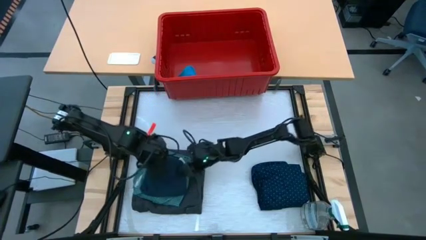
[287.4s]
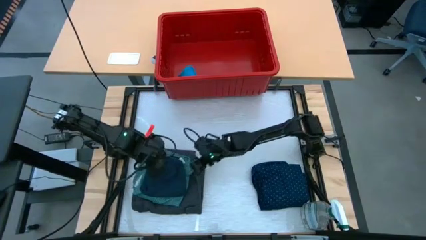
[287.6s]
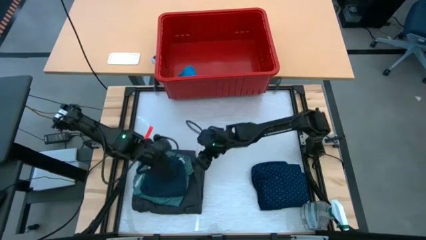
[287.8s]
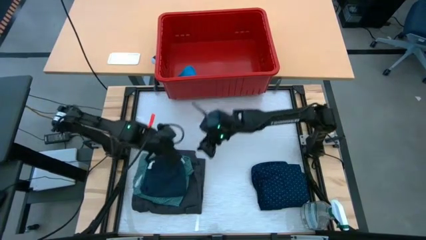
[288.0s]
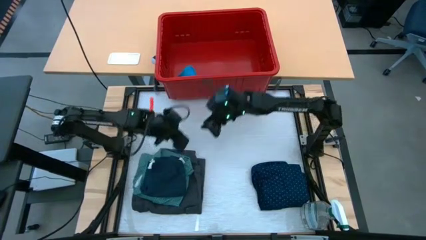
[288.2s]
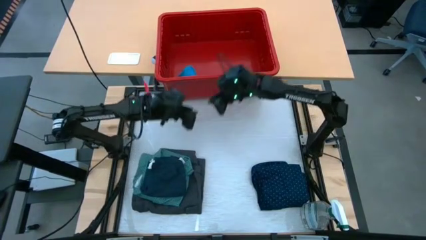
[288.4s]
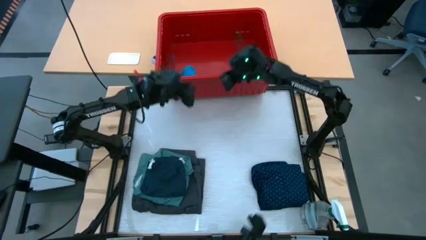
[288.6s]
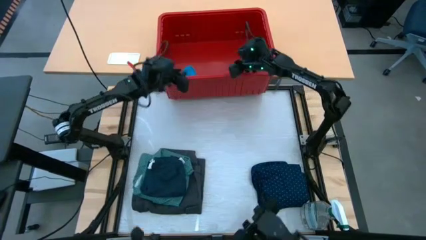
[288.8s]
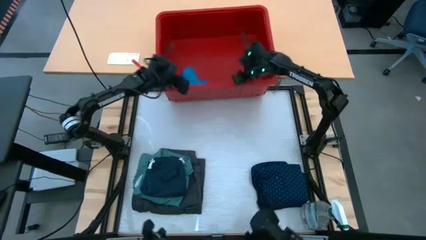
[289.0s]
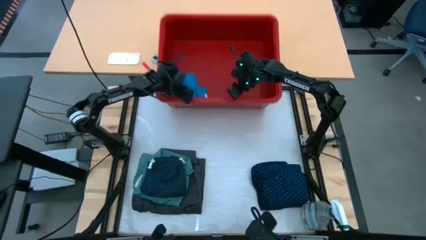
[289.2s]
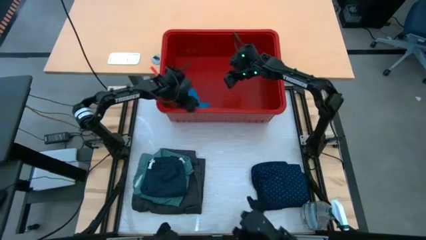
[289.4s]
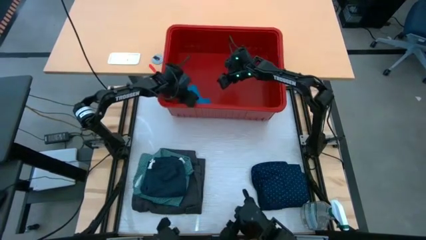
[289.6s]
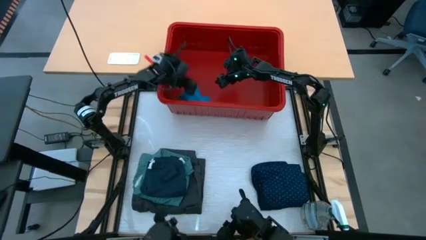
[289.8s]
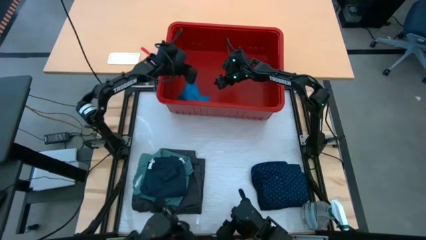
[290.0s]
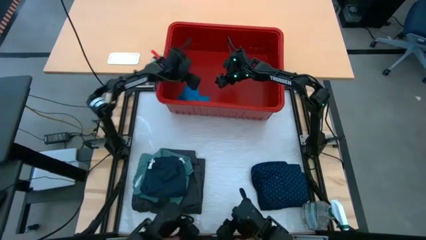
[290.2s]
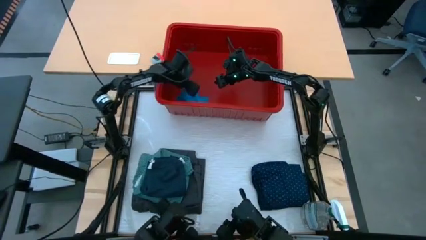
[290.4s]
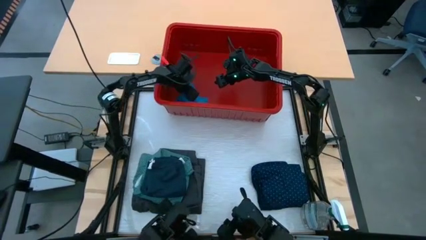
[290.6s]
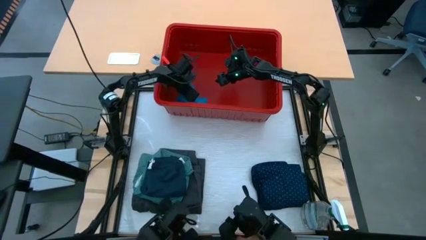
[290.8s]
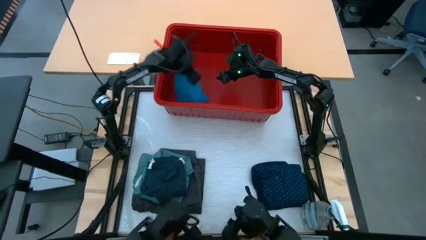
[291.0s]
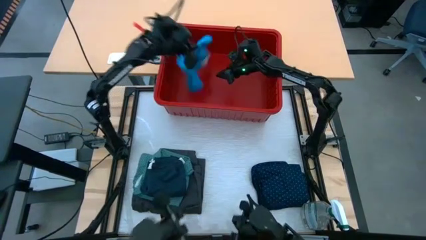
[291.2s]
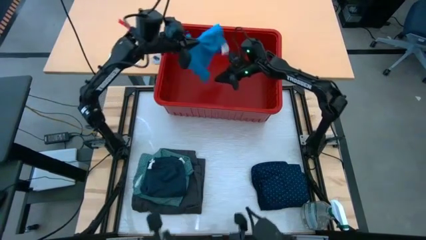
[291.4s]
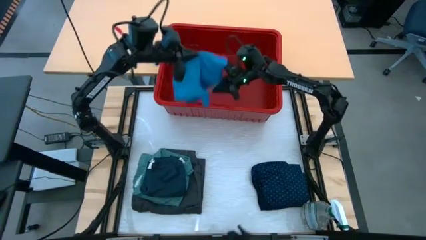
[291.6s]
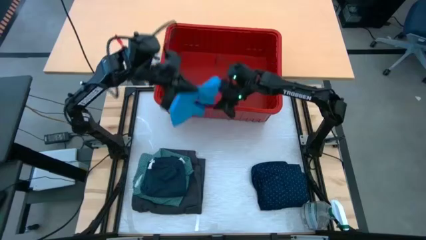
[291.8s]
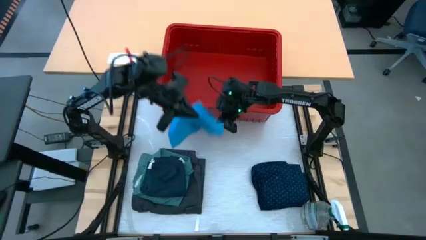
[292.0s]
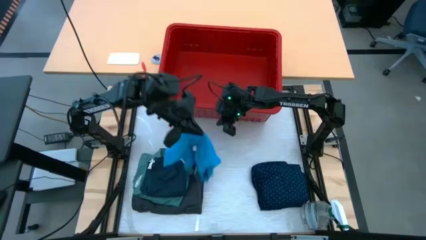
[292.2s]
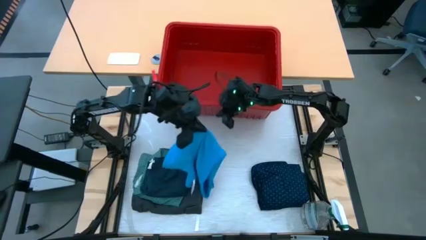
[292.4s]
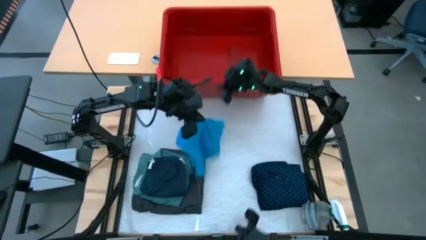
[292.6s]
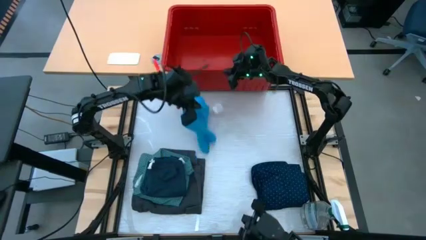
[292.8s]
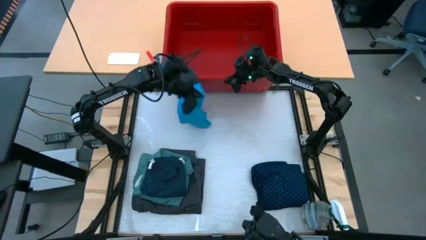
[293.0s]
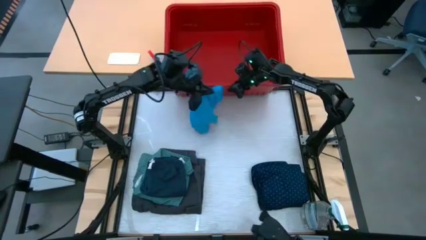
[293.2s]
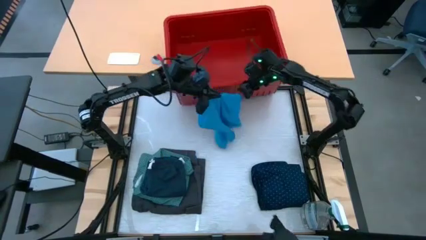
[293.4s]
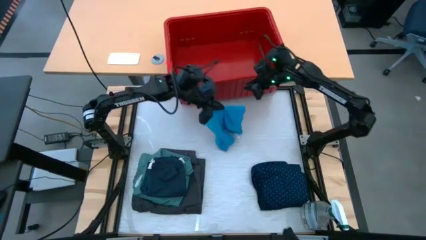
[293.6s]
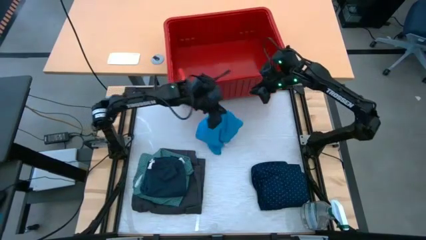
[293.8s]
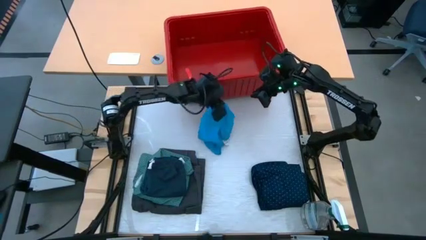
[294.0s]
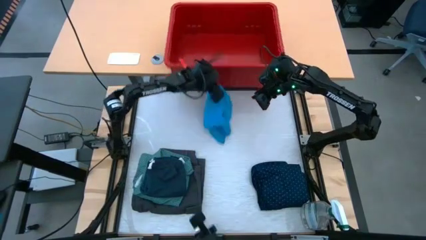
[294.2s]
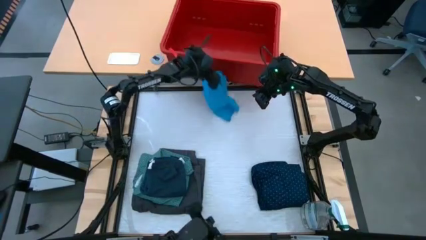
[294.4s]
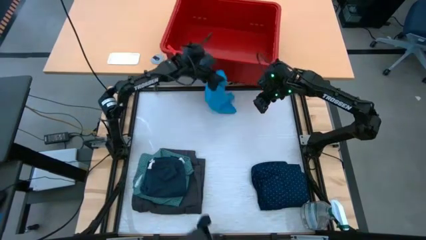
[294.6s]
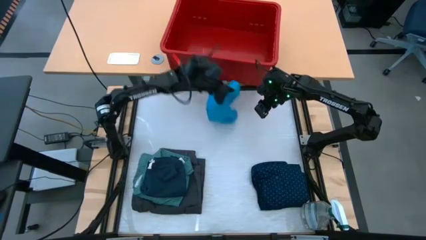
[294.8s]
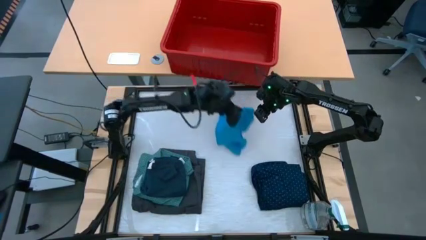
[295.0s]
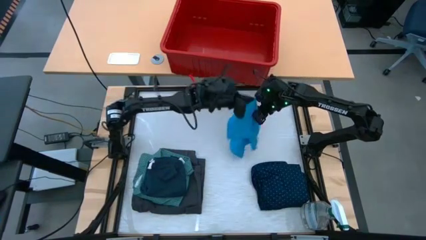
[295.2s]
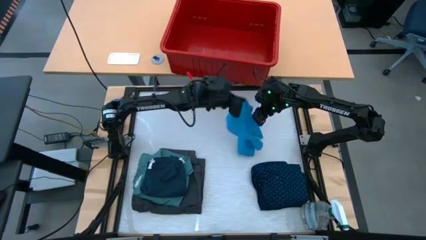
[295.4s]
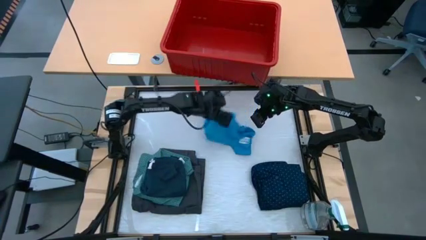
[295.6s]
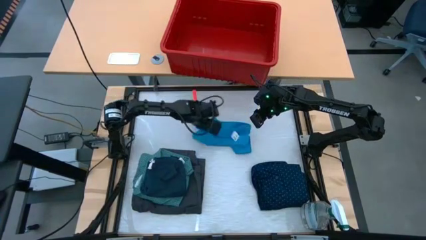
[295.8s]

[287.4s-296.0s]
Task: Fold laundry
Remove the light blue shorts from the red bin

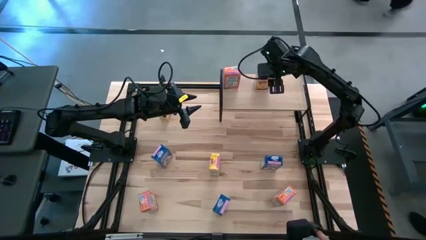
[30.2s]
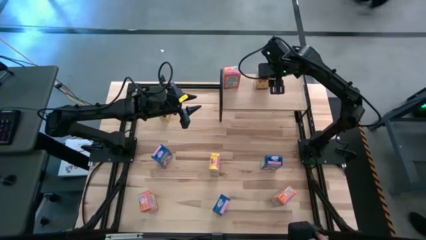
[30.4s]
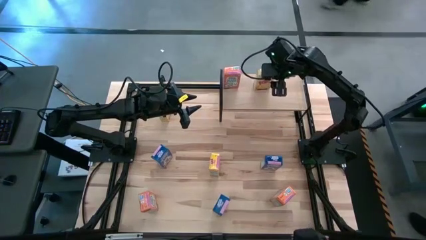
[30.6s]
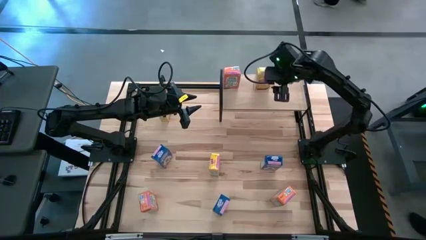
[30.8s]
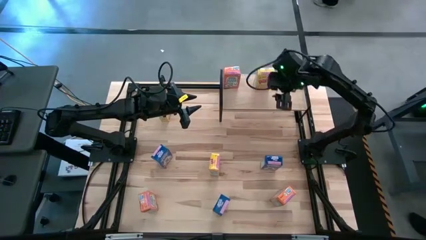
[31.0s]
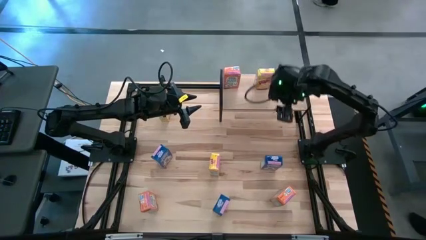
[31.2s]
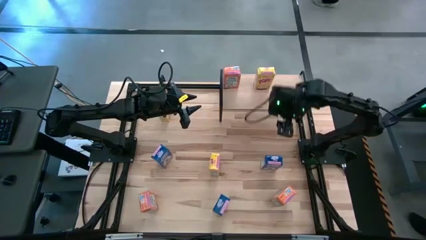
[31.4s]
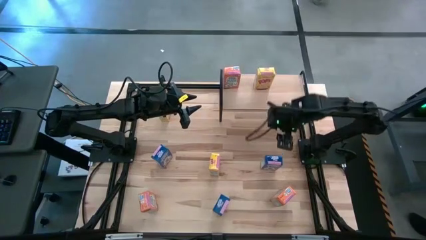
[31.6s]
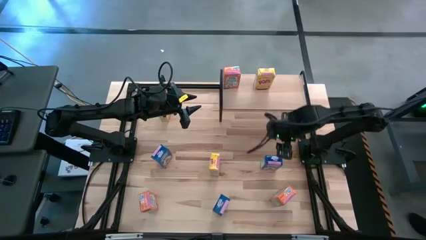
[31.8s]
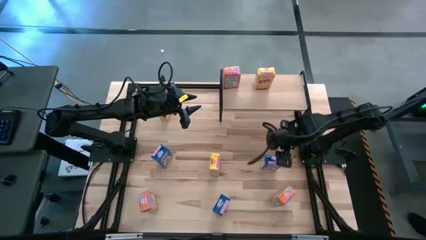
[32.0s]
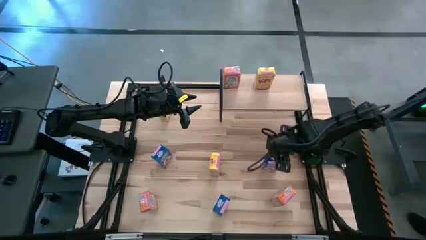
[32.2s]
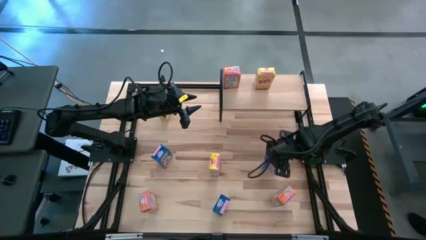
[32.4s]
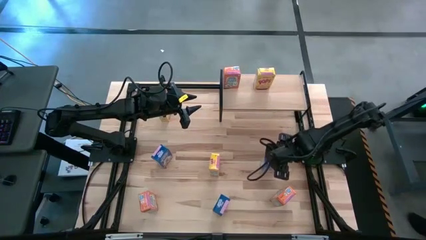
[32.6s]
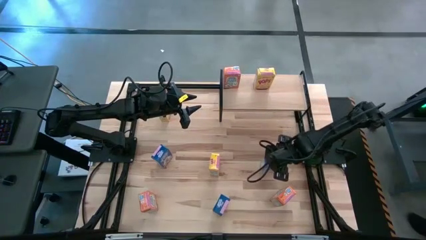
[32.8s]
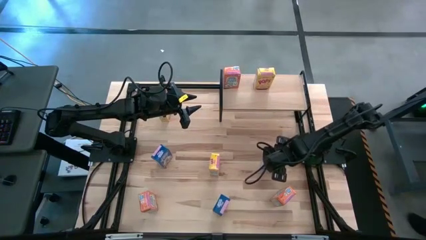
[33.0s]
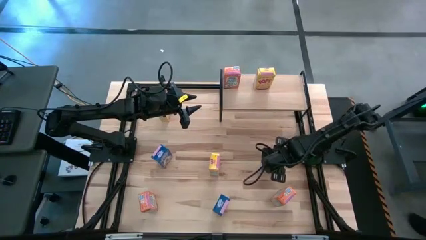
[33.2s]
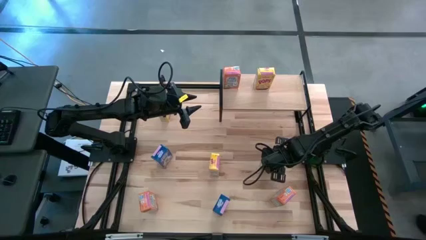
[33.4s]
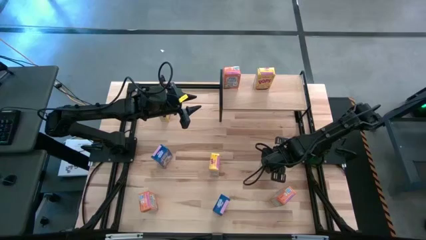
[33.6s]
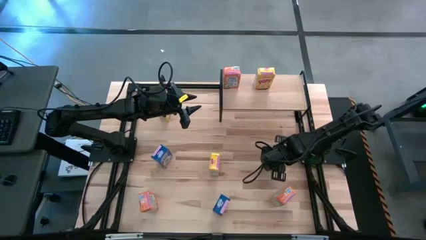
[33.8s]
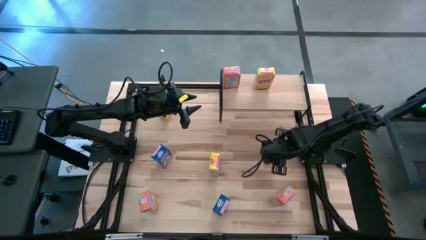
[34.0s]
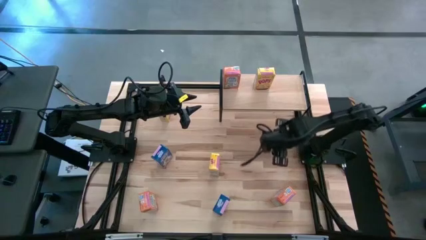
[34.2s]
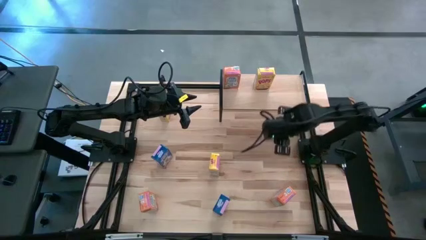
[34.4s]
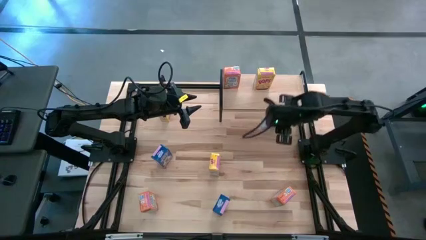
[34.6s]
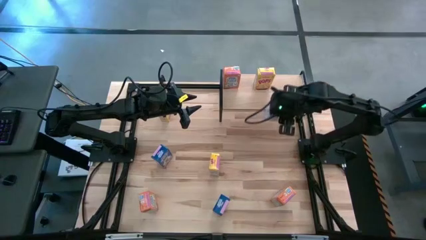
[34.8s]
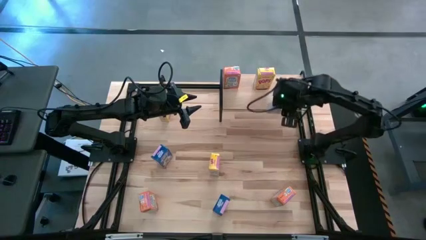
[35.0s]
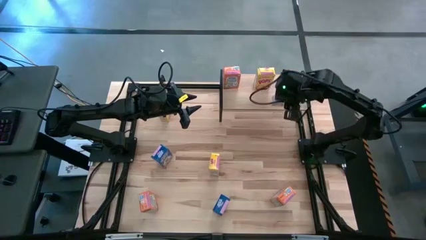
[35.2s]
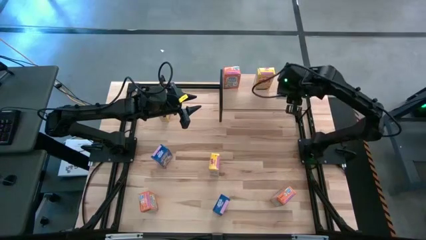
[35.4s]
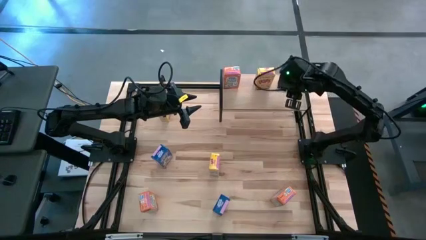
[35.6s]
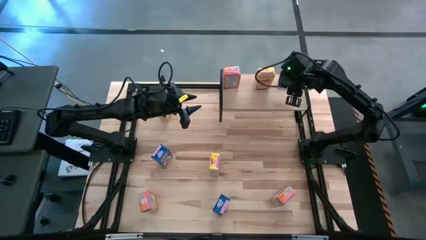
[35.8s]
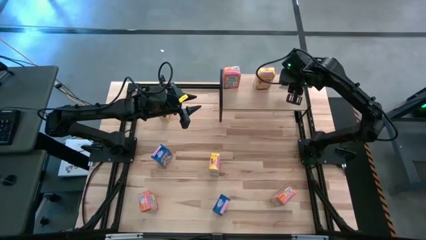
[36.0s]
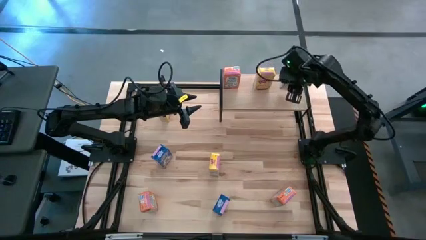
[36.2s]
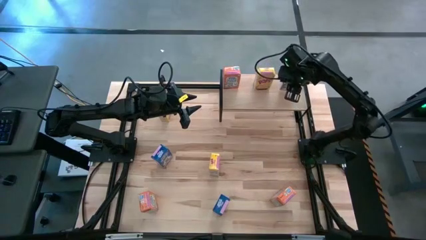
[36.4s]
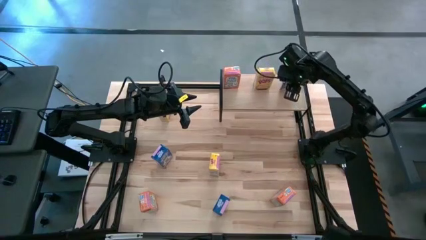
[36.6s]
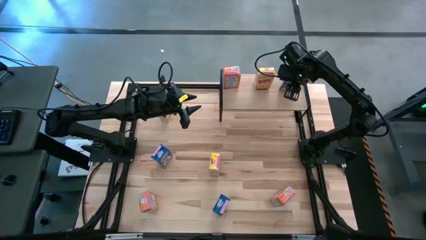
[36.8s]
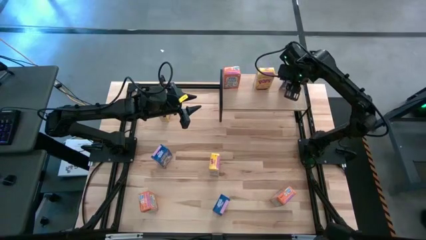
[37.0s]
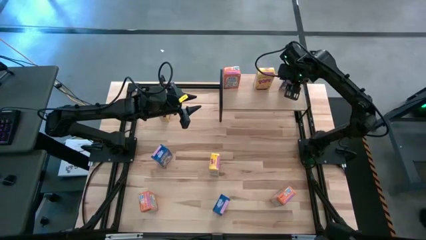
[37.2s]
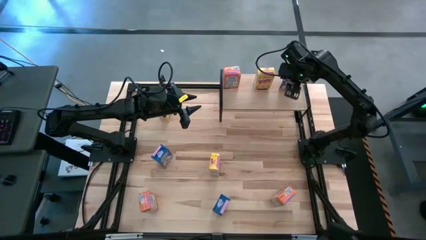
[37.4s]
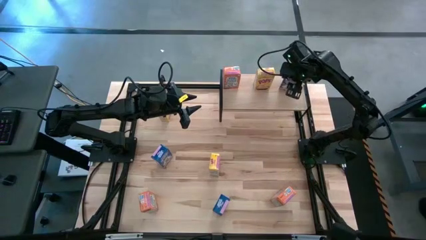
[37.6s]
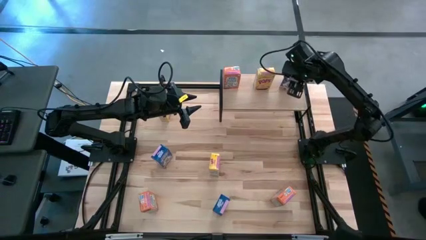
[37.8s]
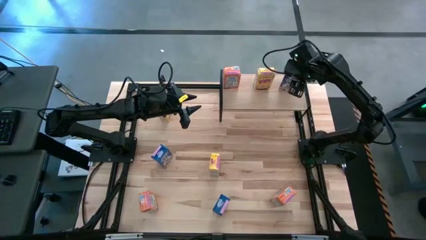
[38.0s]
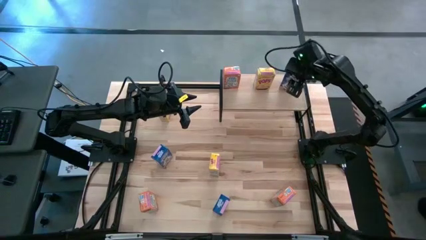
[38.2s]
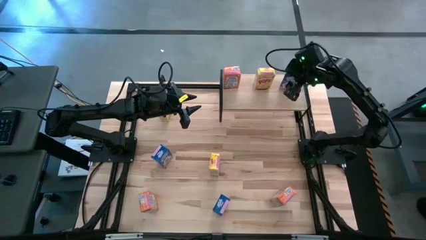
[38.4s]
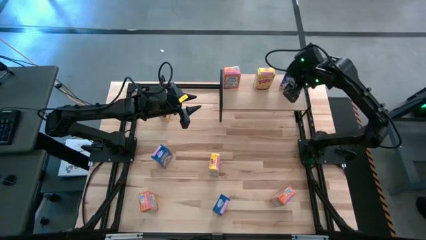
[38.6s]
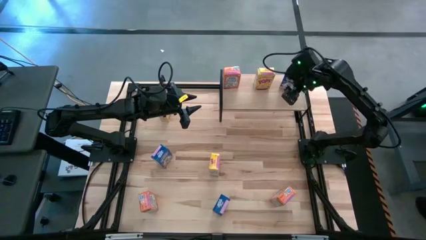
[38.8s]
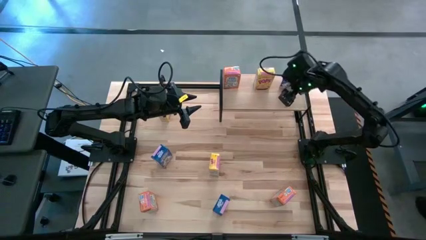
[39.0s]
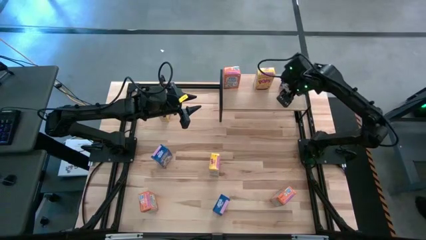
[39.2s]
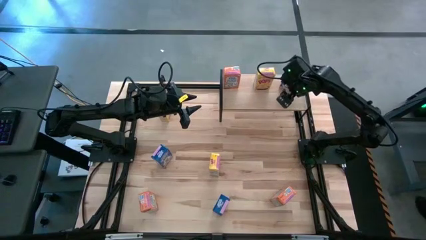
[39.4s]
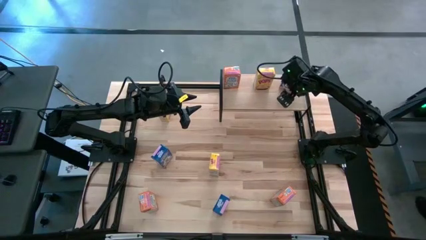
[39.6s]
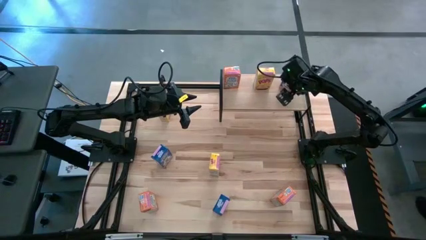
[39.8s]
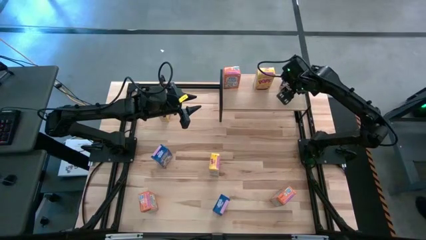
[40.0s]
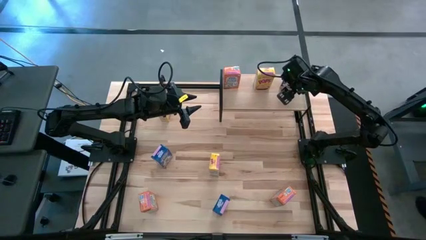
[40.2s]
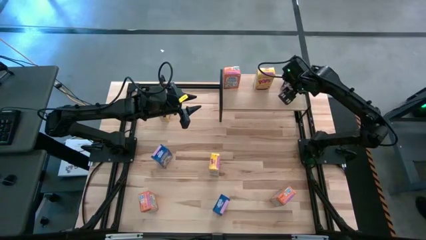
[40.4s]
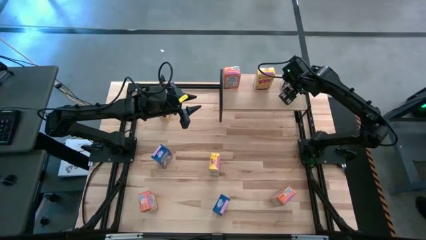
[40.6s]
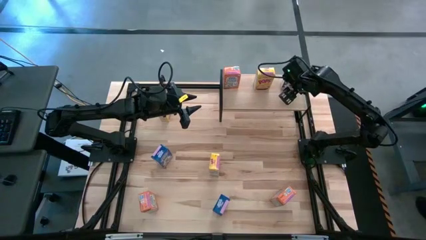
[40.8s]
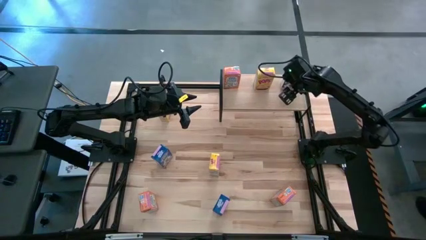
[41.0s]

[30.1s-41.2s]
Task: Stack cereal on shelf
Put the top right blue cereal box on the shelf
